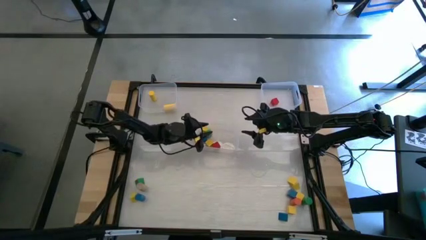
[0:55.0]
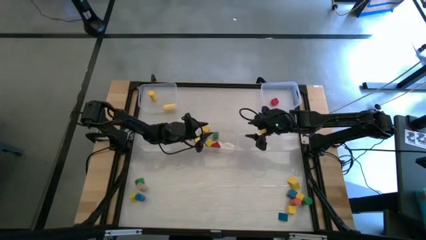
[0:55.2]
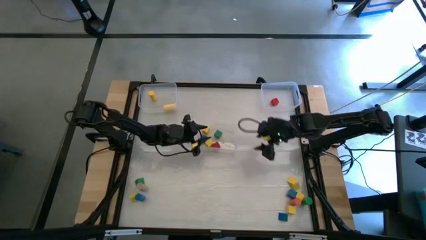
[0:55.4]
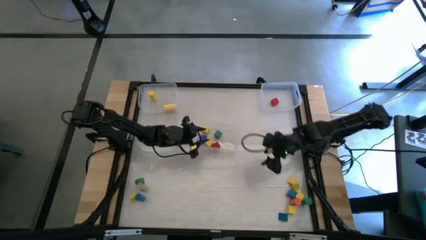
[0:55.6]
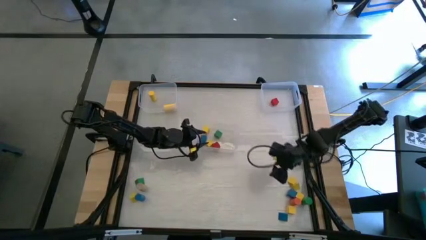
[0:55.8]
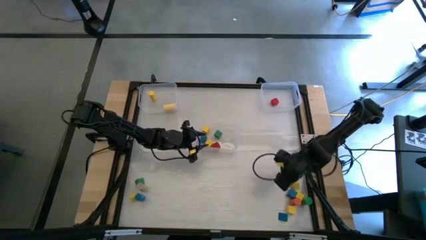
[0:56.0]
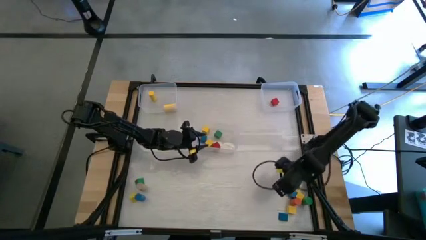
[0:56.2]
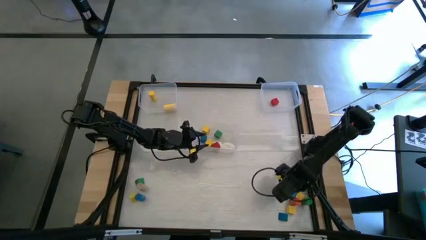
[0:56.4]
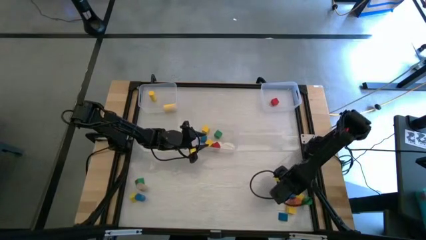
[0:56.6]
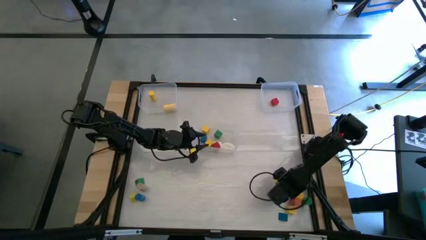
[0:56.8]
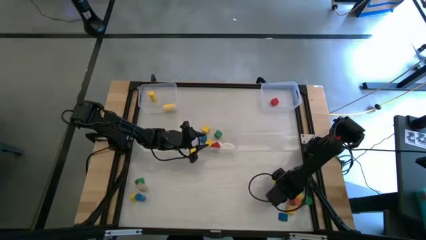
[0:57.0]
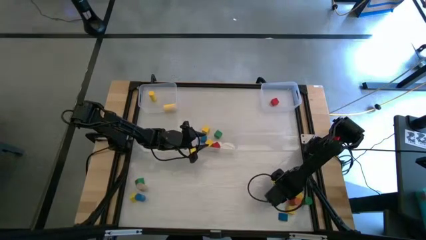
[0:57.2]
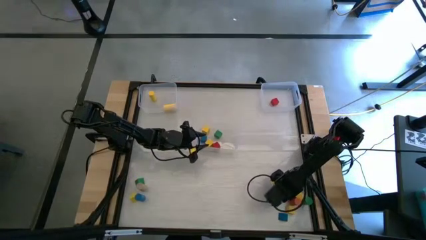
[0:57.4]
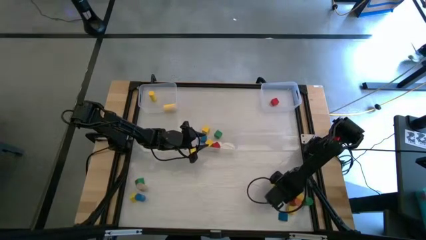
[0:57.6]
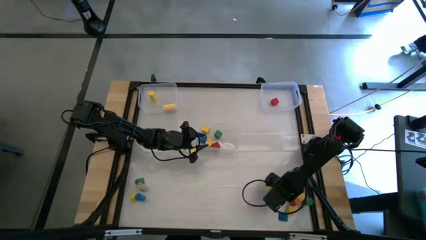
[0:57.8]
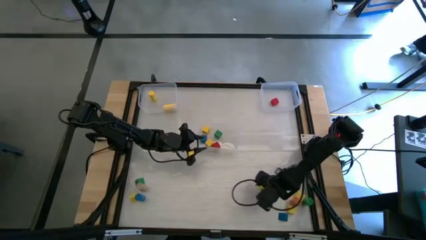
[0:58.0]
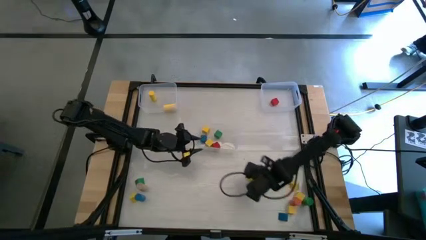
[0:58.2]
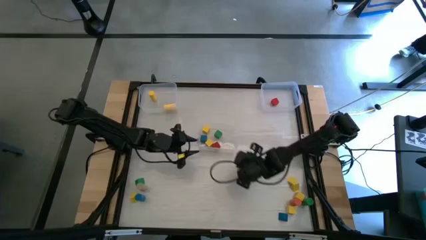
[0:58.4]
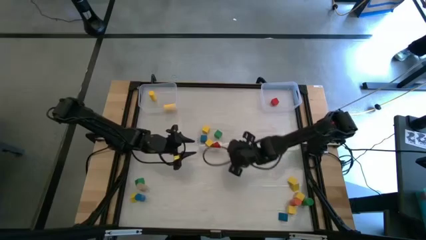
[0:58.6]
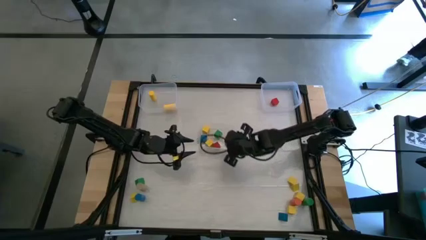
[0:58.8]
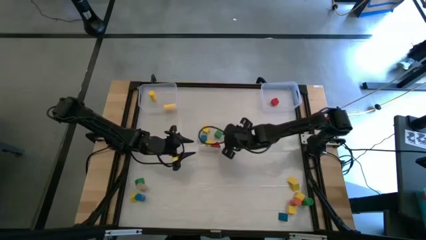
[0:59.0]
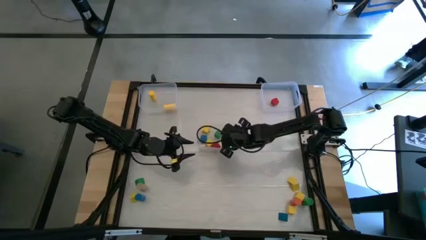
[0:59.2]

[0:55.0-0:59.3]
Task: Sort blocks by size
Put the blue square block into the bottom transparent bin

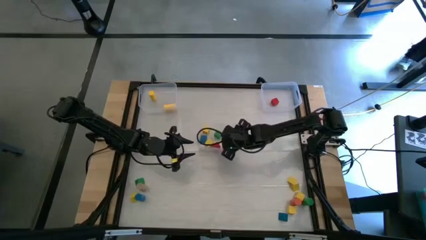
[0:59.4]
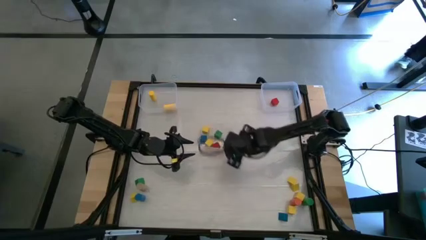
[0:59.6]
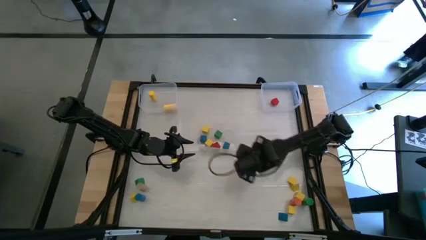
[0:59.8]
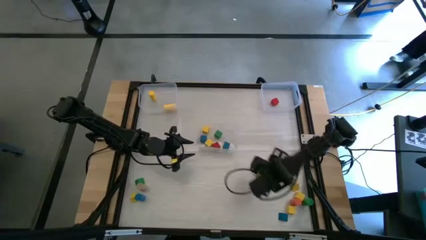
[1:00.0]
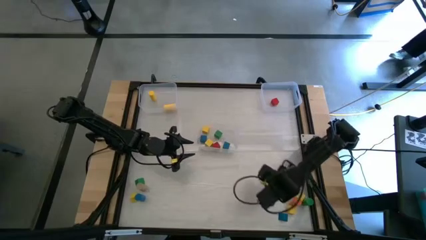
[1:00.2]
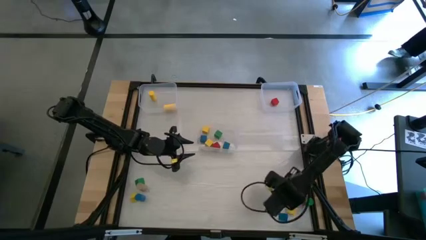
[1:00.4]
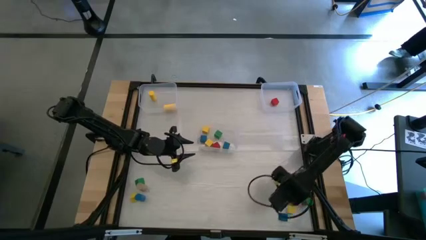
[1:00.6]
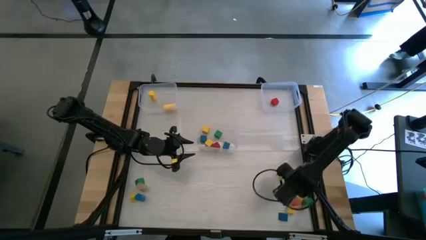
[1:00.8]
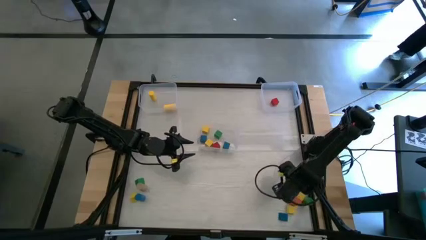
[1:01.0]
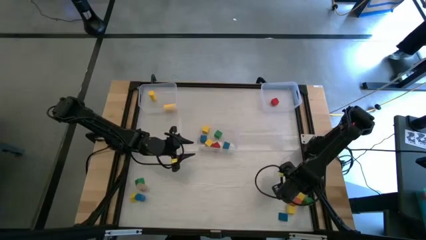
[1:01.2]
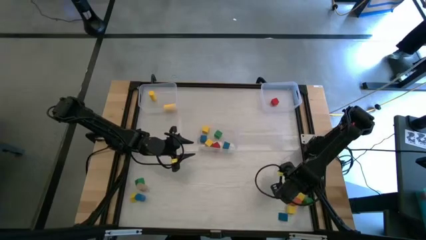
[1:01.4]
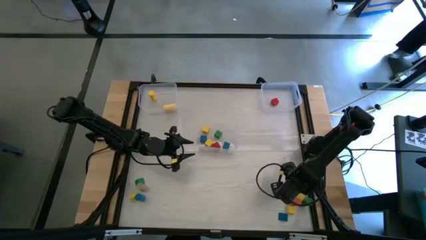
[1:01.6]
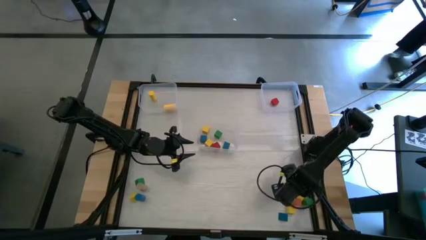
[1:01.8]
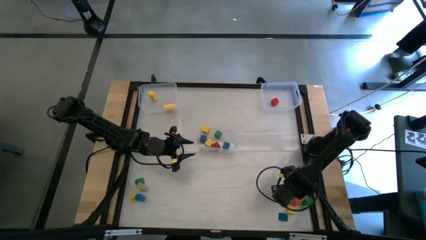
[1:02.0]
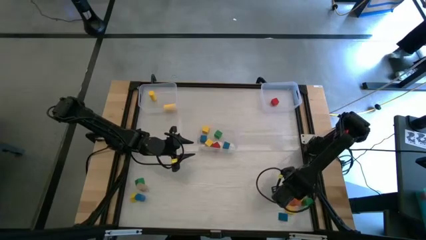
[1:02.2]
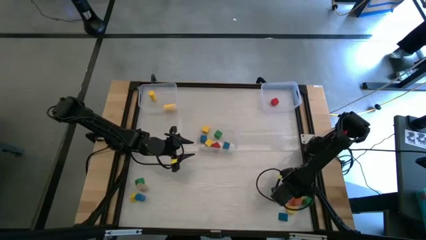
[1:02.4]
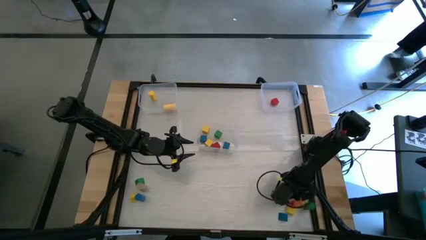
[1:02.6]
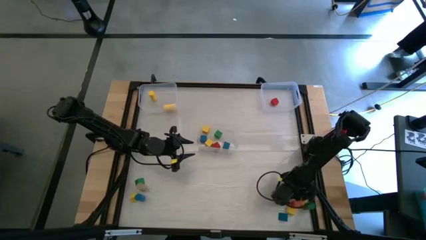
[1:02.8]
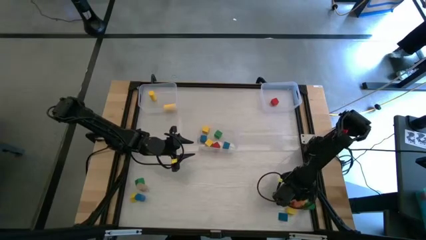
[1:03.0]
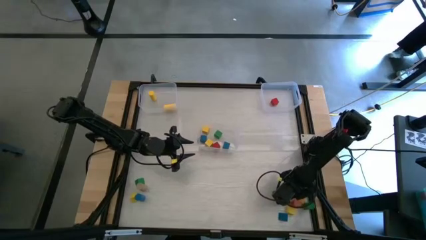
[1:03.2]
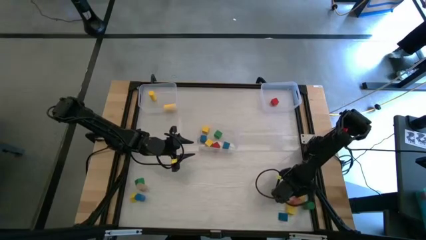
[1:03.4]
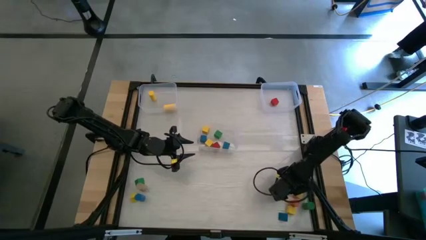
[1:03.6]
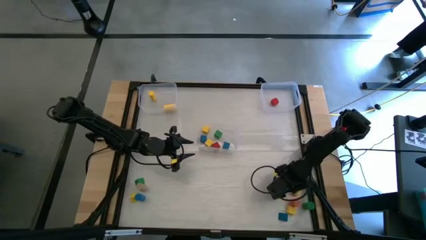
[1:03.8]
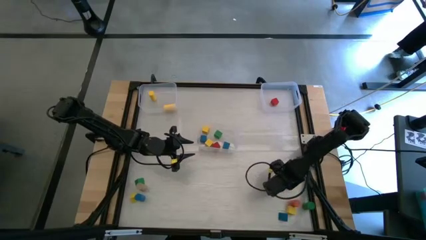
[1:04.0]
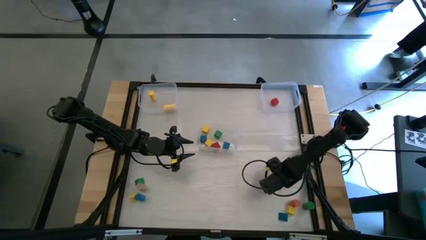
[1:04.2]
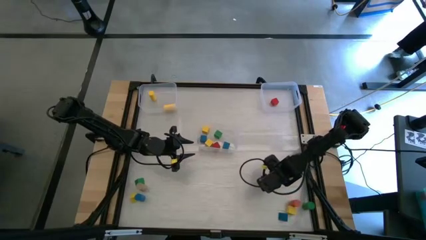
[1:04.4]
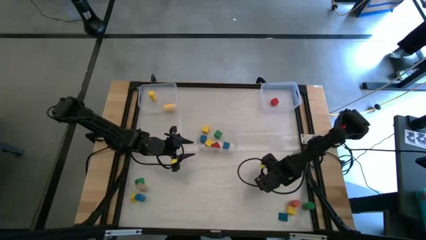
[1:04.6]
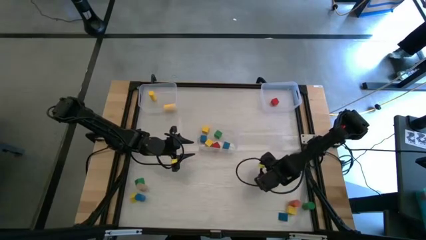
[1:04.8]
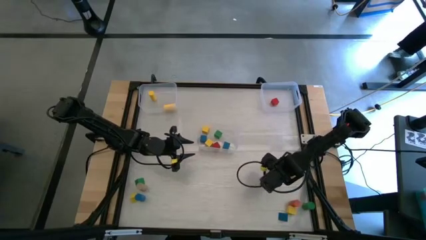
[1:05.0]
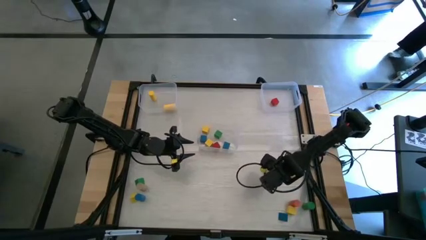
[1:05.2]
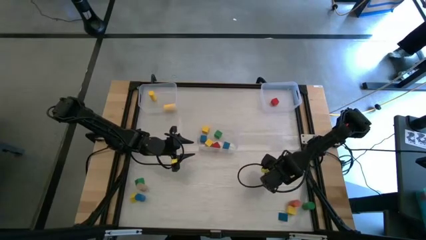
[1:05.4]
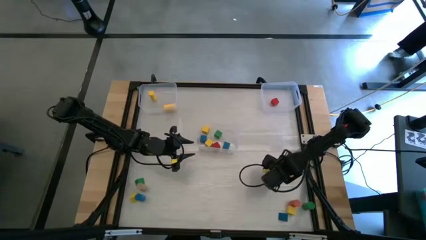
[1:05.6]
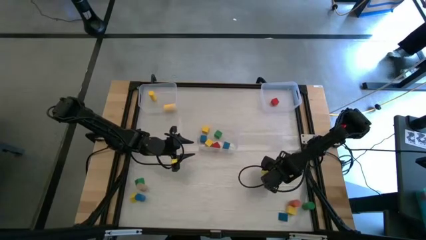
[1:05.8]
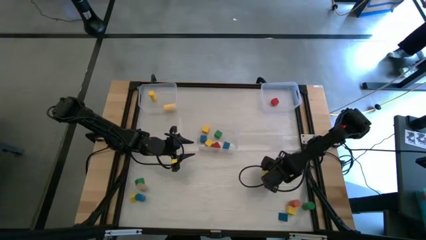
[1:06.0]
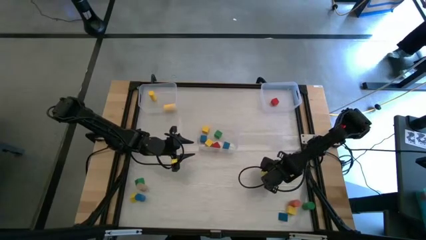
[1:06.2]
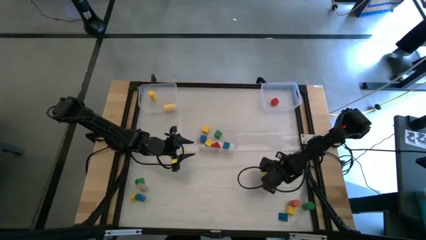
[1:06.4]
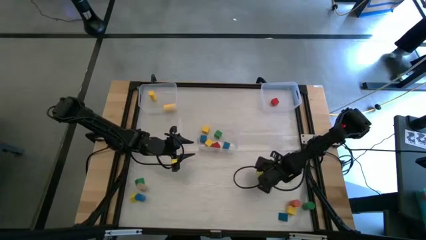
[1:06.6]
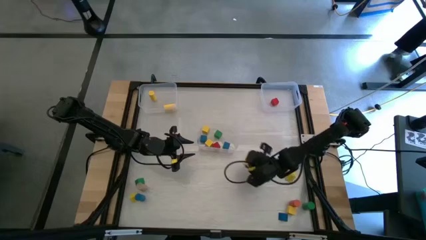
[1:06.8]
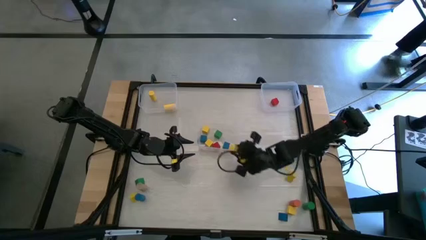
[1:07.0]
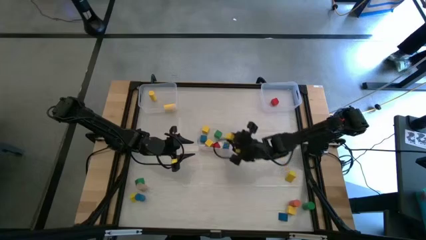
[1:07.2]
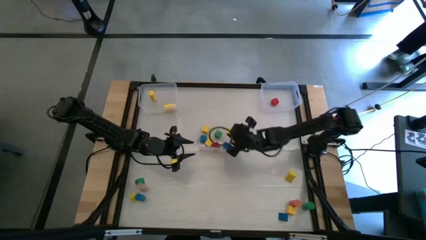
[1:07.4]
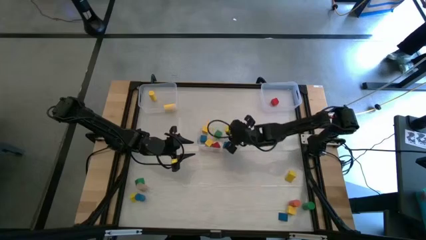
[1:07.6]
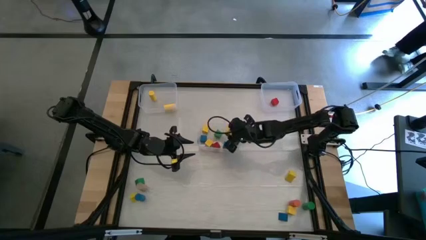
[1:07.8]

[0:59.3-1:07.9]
Put the yellow square block into the bottom transparent bin

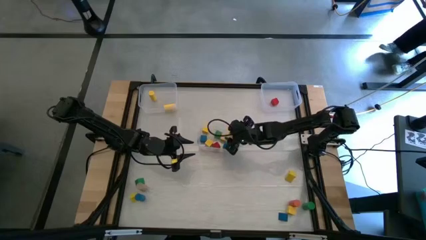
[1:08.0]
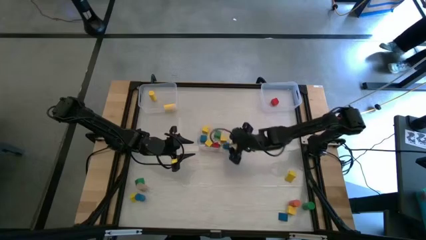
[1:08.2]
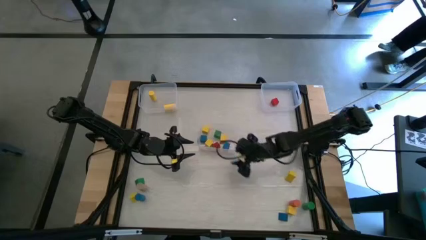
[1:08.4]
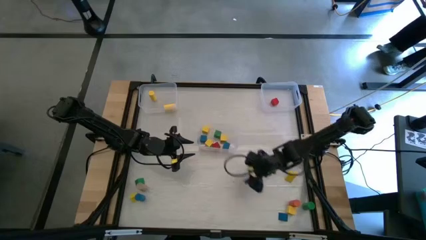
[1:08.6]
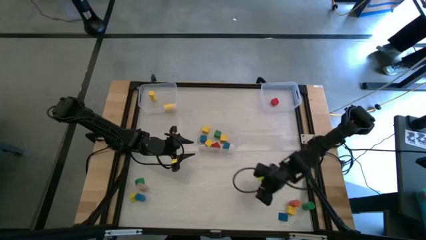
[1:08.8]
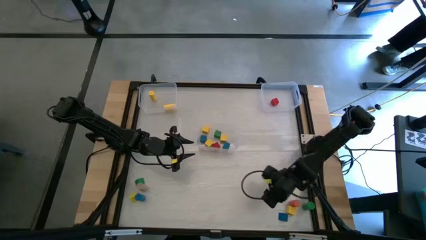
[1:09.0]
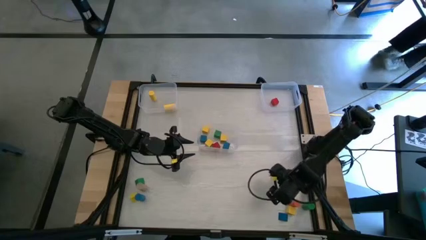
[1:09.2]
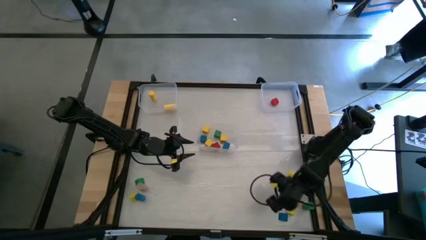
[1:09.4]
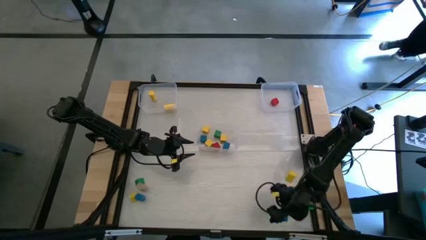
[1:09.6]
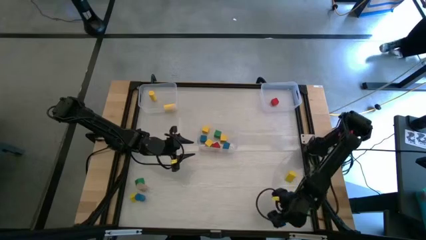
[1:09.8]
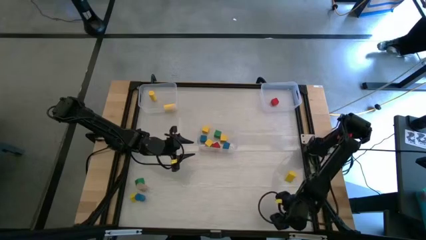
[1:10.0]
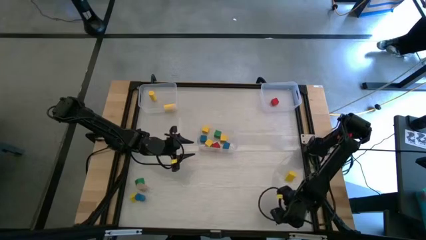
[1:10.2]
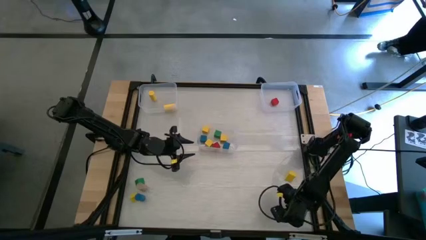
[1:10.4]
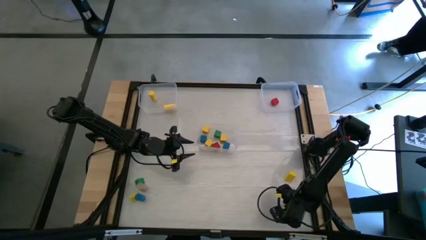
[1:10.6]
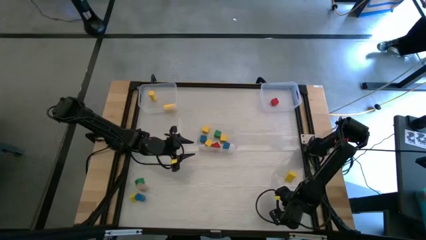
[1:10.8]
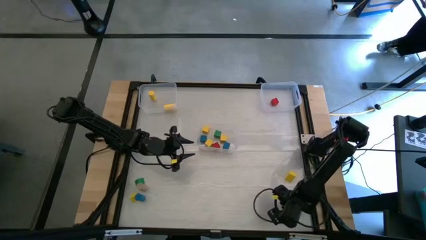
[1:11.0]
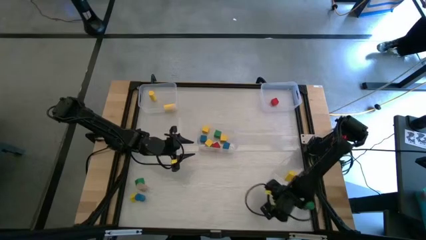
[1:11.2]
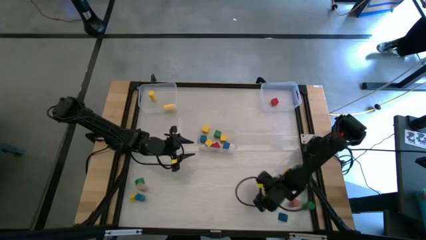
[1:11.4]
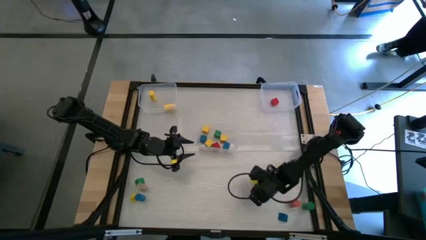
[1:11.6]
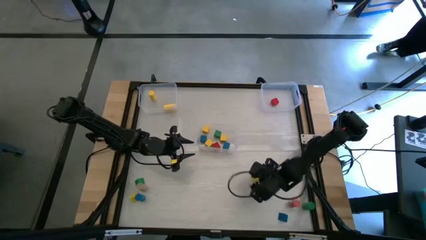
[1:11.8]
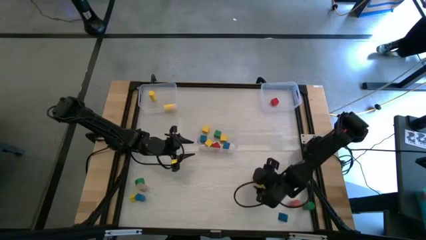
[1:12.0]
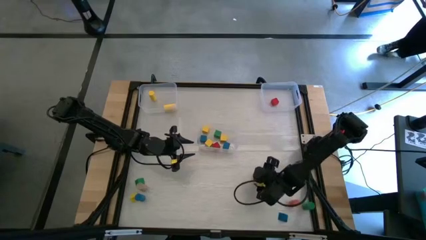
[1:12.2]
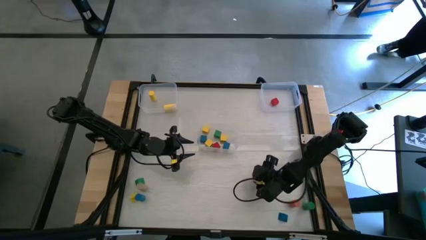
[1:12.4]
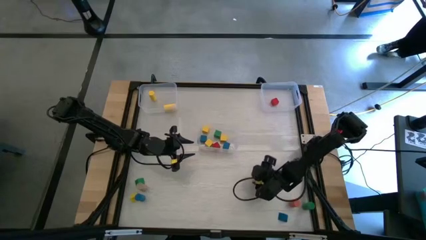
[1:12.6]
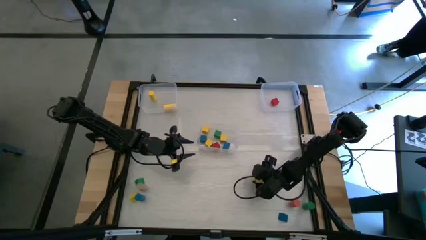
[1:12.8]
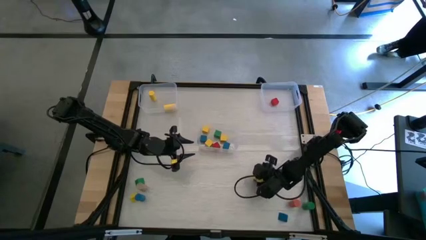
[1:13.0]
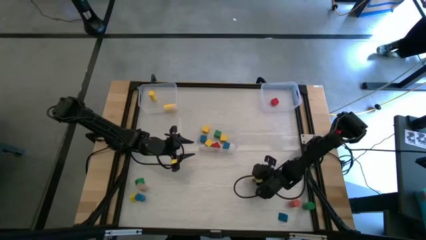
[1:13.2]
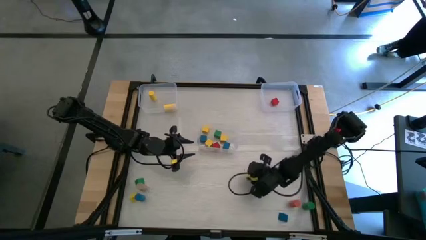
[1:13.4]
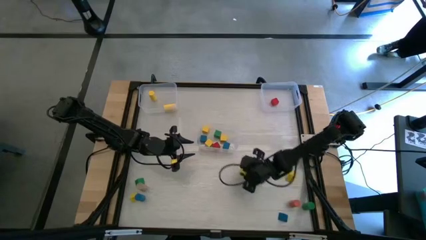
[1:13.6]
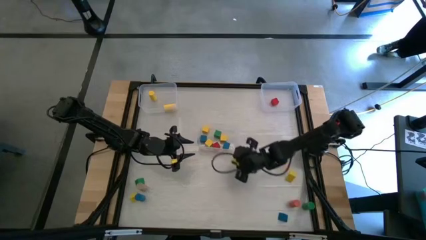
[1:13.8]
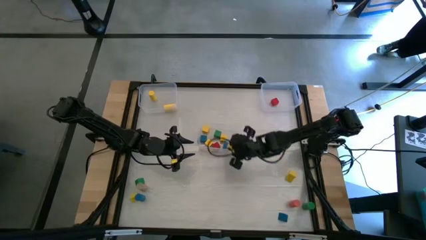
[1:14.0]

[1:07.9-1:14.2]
Put the yellow square block into the bottom transparent bin
